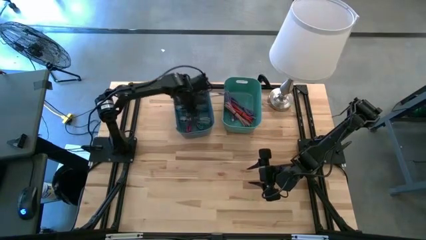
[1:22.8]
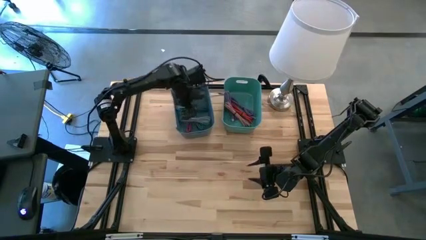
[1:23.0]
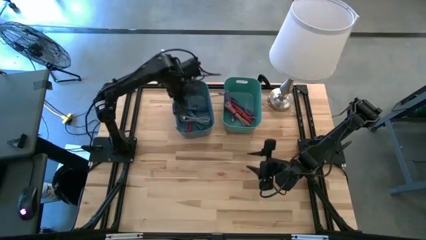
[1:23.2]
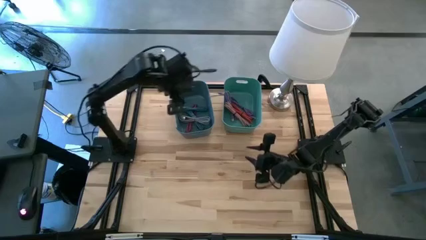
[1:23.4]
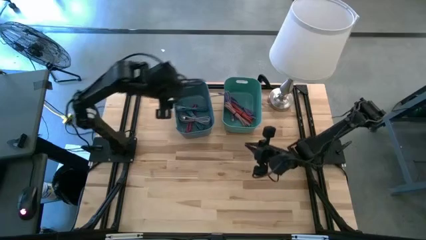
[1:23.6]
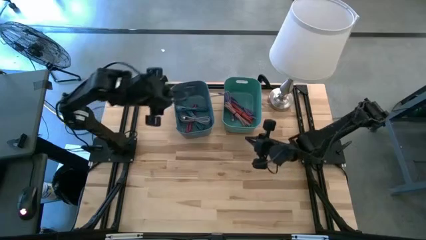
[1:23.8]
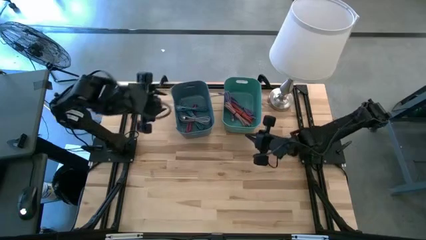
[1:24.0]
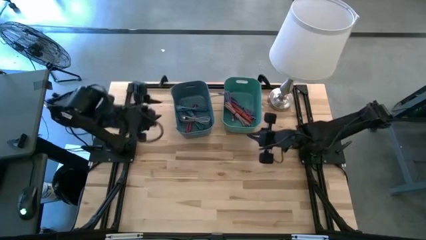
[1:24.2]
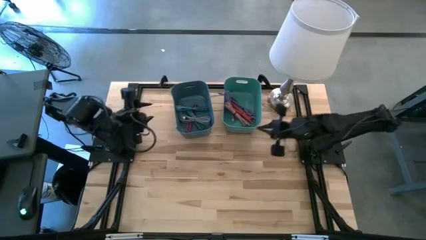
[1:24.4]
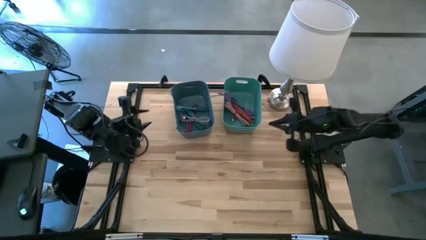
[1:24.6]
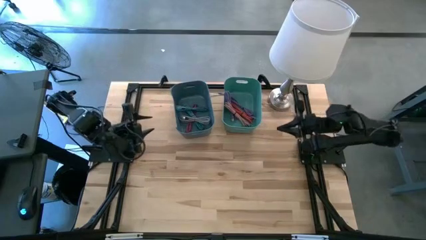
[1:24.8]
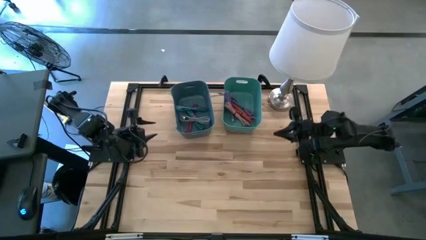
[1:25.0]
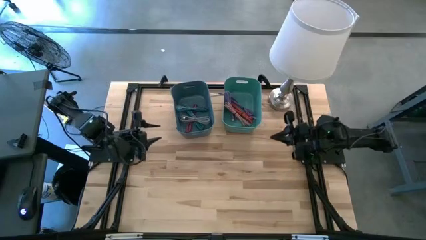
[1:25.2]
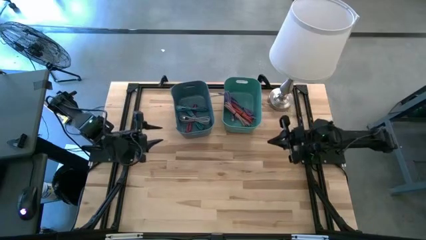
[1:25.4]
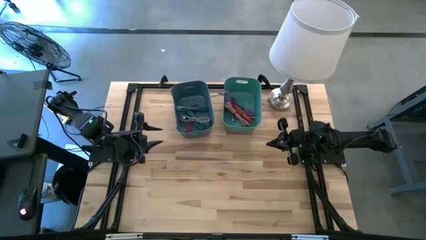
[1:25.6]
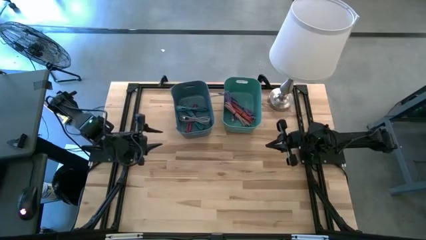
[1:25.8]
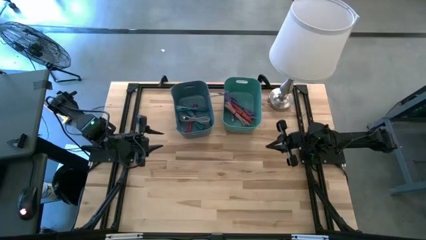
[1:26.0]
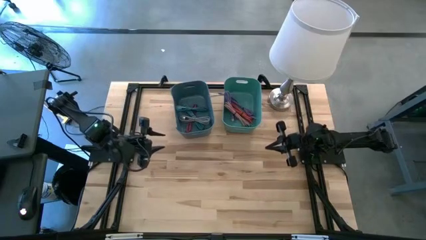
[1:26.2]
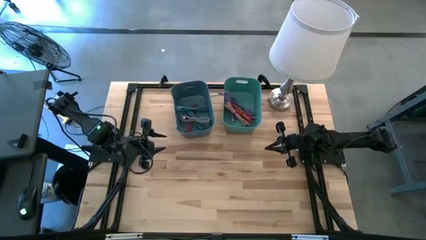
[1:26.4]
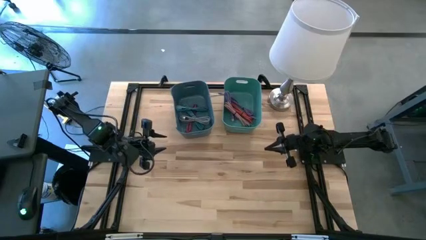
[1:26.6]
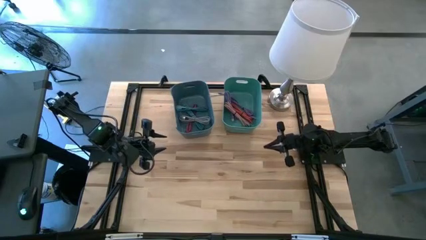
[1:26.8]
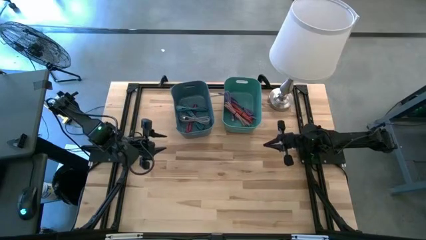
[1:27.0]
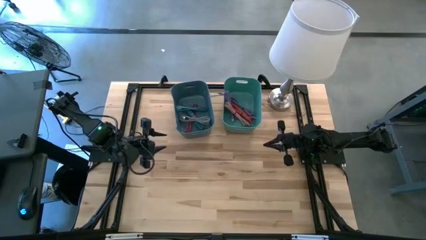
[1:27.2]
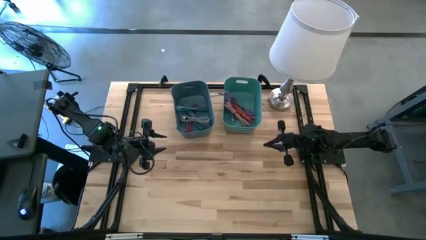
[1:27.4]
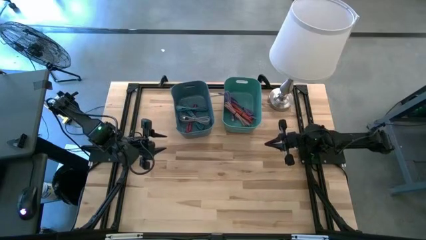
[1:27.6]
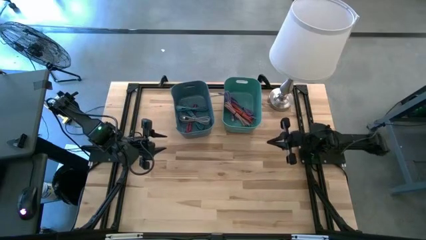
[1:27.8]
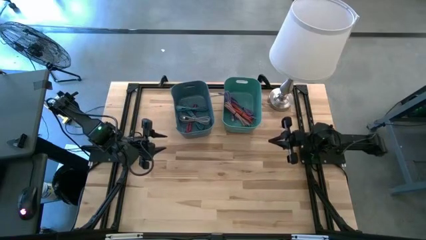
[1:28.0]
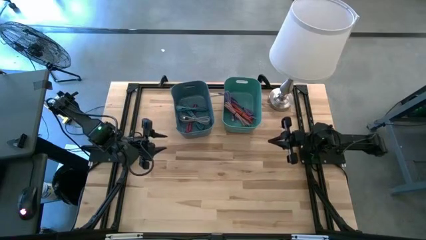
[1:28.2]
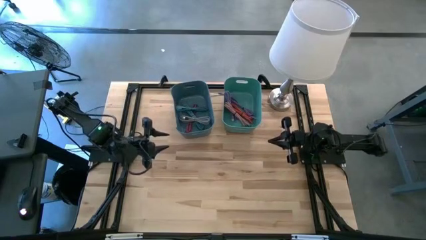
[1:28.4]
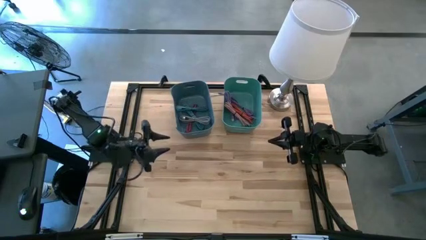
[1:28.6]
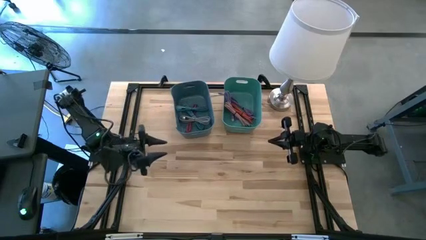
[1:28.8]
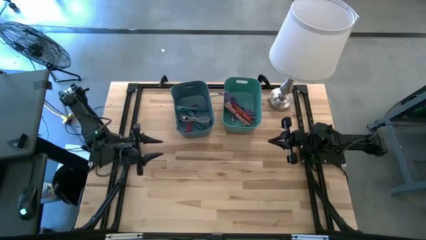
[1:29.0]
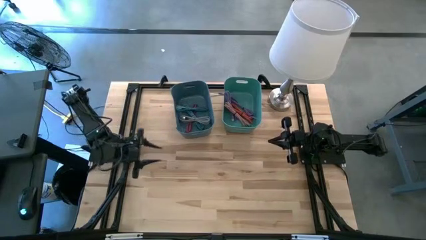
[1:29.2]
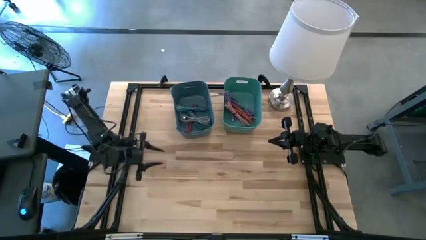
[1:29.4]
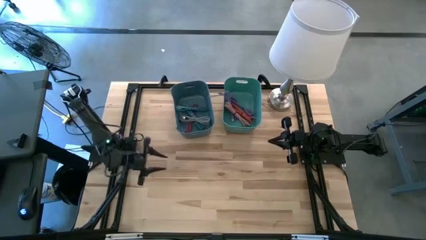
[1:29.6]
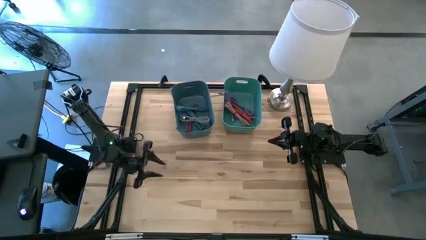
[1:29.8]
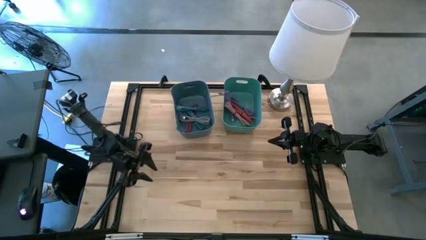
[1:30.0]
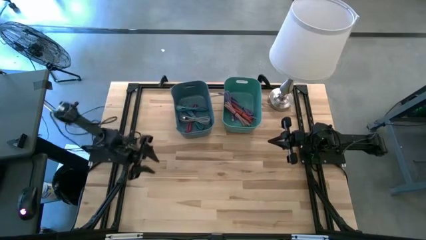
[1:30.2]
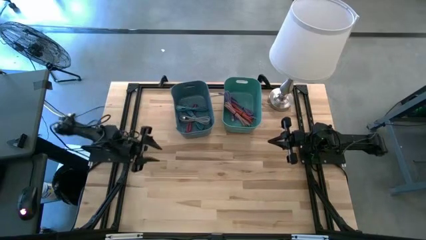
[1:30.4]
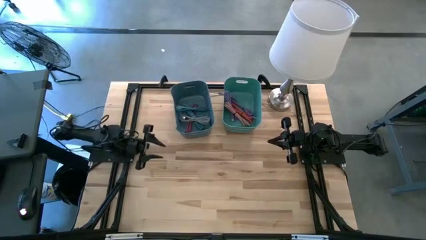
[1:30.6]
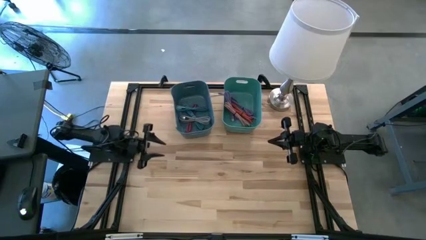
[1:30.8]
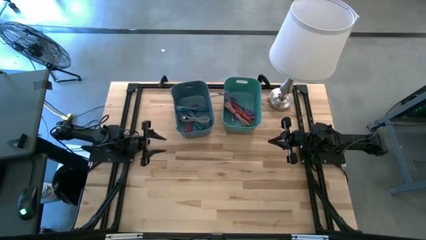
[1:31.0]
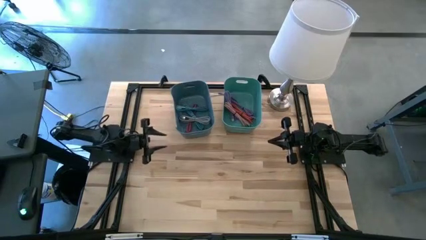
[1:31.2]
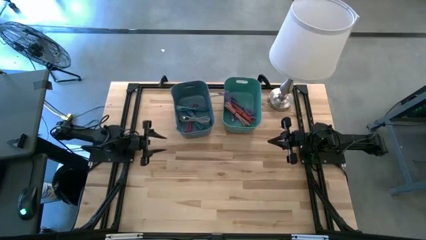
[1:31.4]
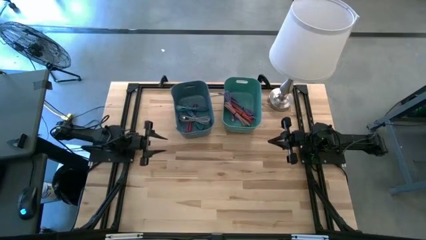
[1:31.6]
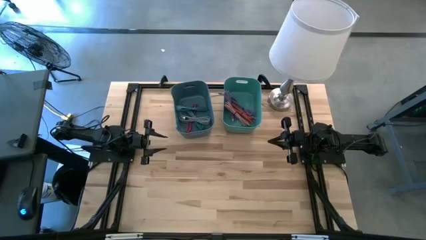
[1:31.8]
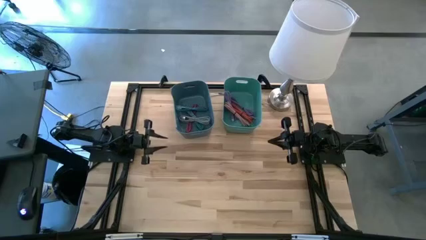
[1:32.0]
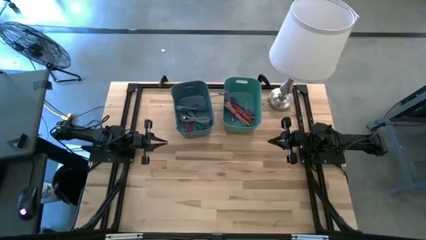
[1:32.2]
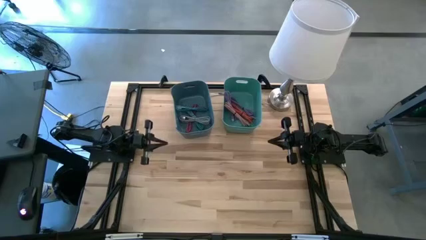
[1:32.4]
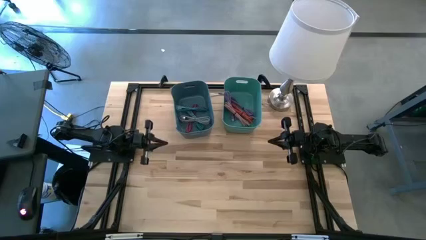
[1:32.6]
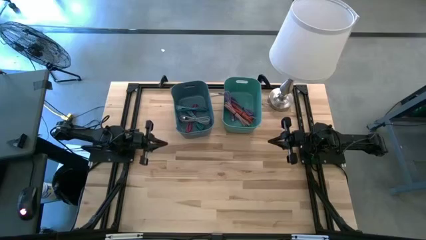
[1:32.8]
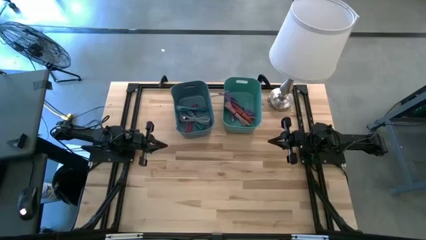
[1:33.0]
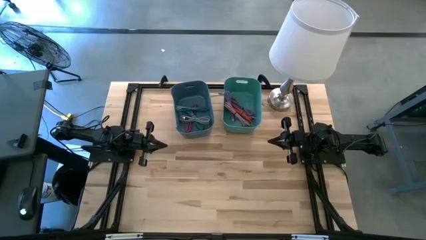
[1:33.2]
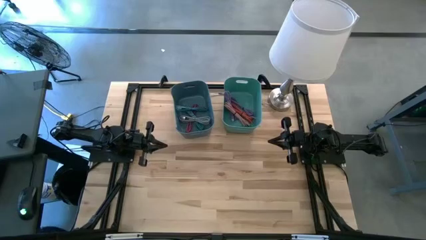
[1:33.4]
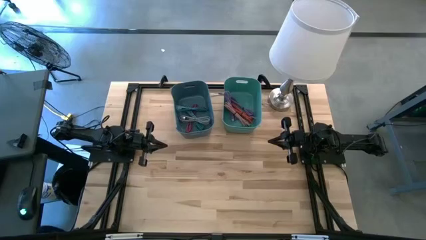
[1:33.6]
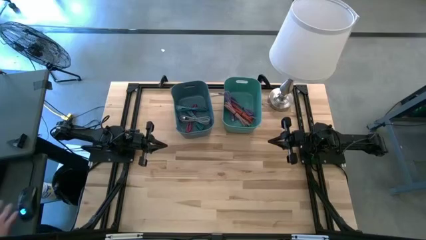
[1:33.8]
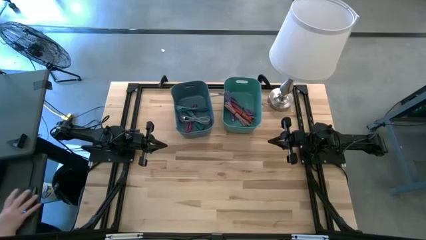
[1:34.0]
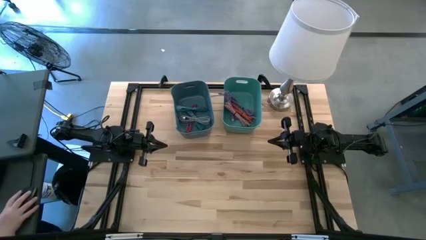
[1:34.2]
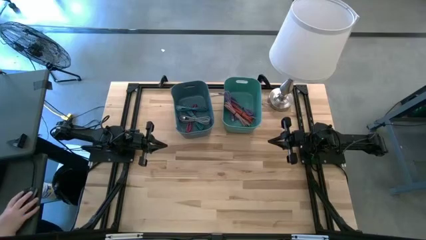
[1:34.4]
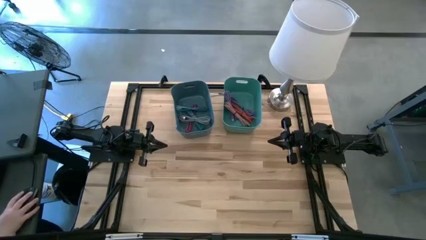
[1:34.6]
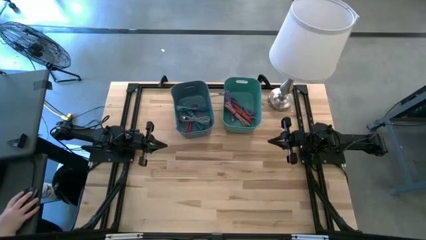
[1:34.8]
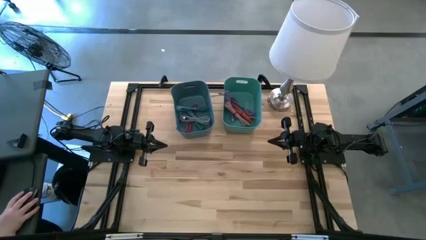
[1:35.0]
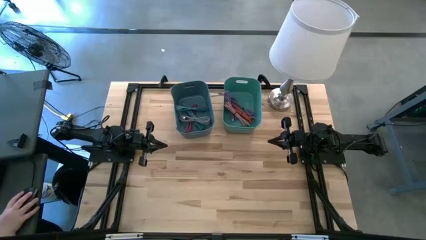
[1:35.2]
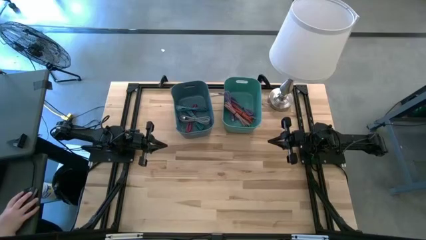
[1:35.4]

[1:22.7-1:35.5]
Task: Pick & Place USB Port
Return To Home Position

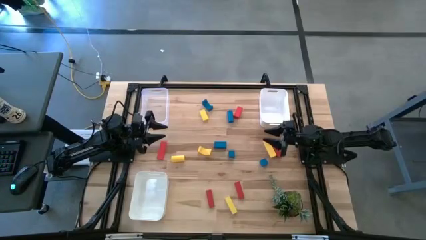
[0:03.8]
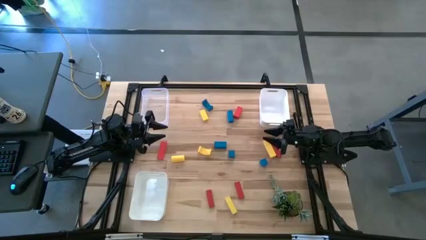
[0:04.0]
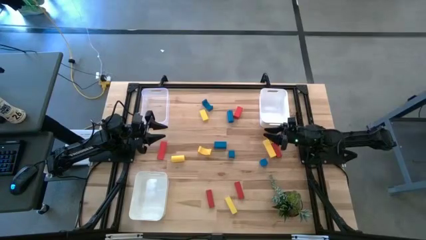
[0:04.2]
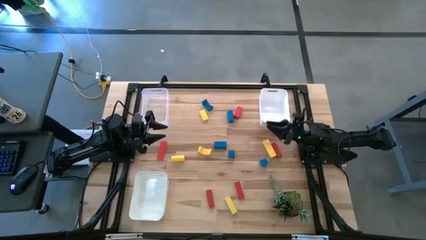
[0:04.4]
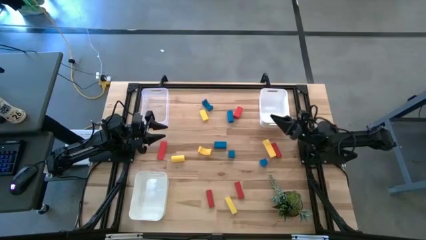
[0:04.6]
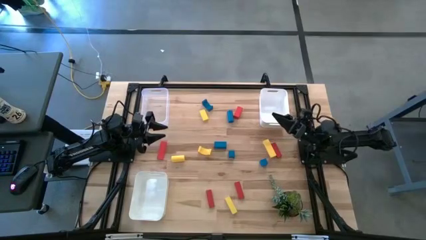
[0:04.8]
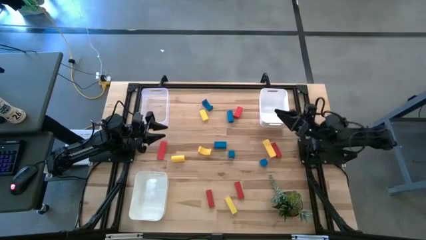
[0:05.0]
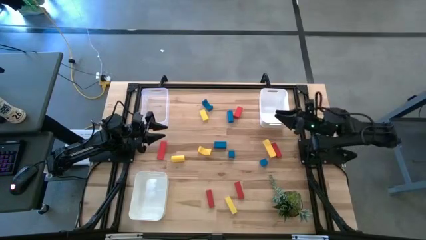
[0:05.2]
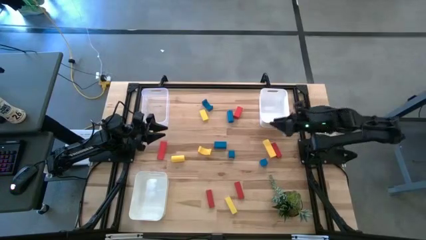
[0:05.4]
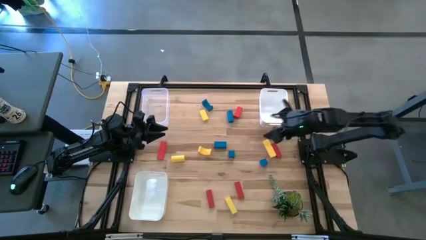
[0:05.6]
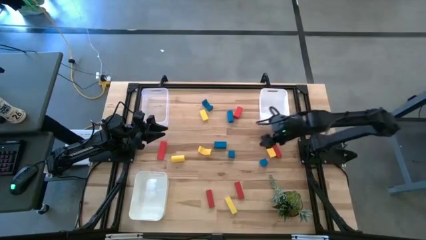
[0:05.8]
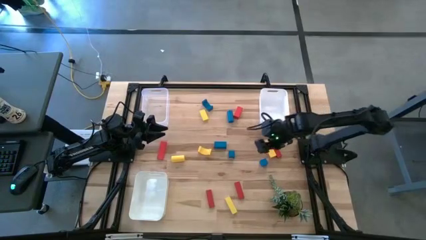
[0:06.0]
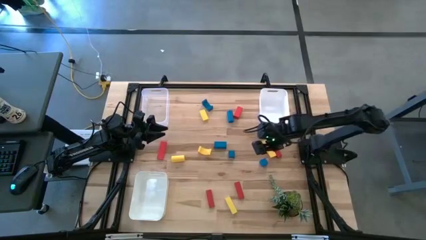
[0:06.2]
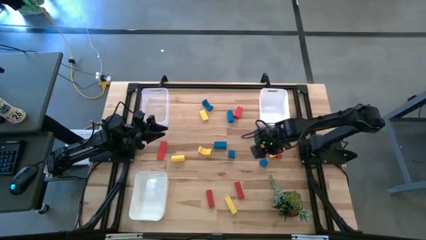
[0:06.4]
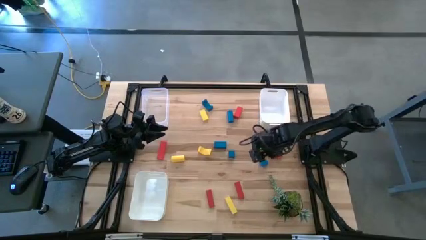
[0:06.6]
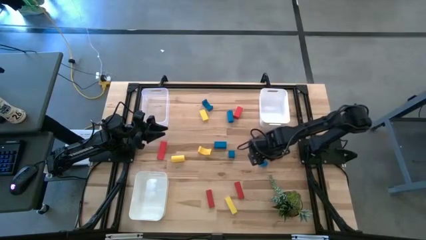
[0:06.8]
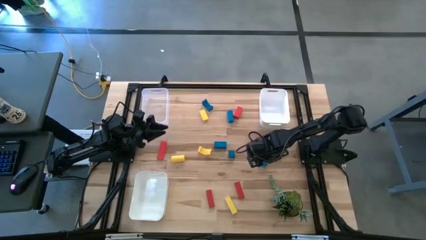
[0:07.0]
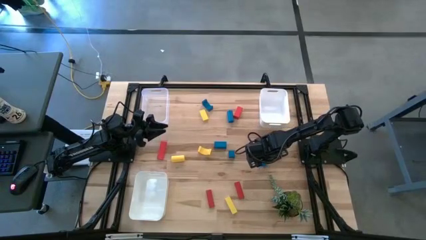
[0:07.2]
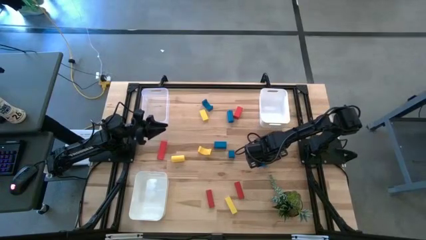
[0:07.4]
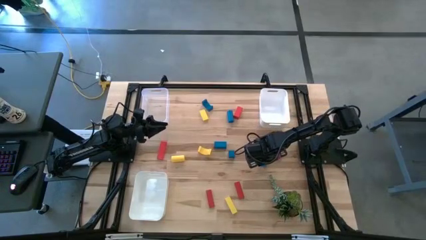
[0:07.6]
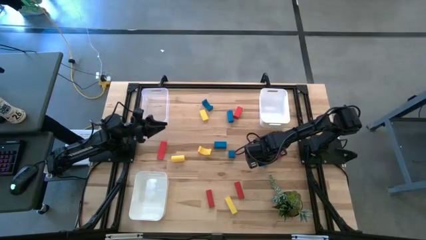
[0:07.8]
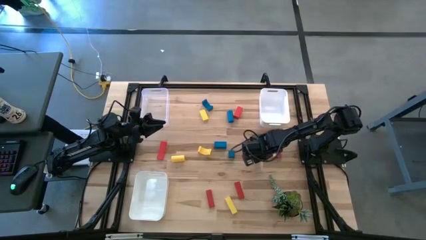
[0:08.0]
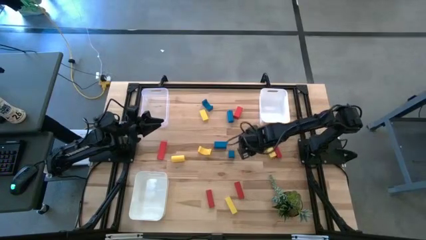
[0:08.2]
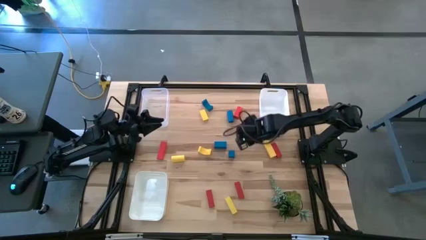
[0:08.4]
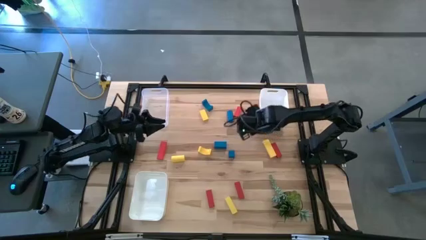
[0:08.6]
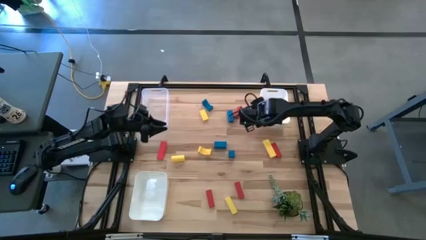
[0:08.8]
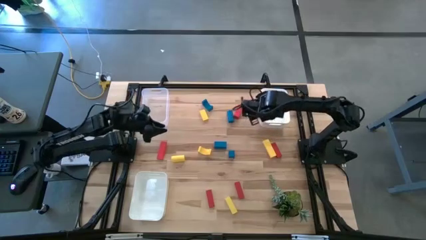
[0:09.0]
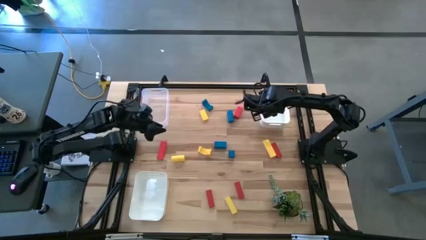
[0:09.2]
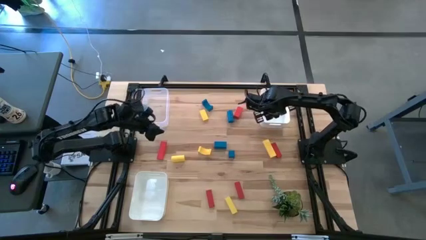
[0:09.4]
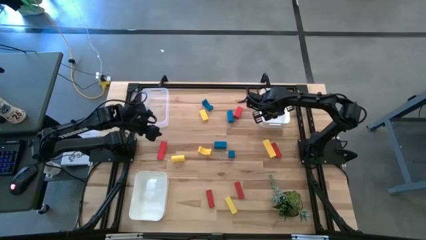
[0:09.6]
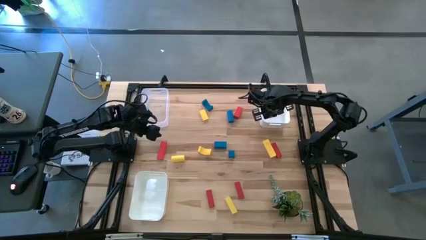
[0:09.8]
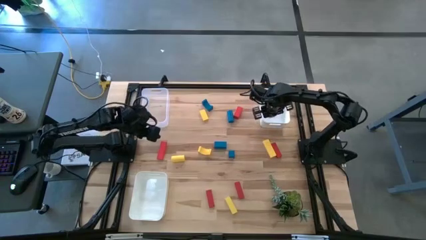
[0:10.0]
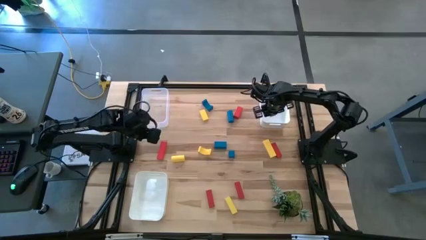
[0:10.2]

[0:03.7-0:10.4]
Task: Sort & place blocks by color
Put the blue block into the top white bin
